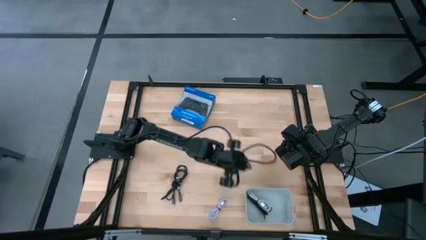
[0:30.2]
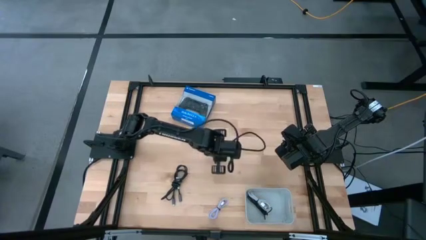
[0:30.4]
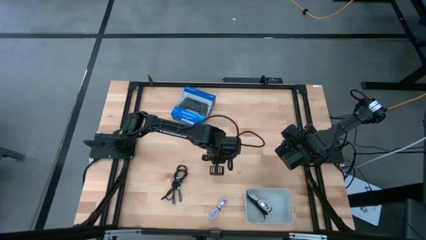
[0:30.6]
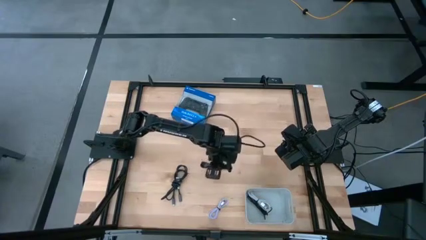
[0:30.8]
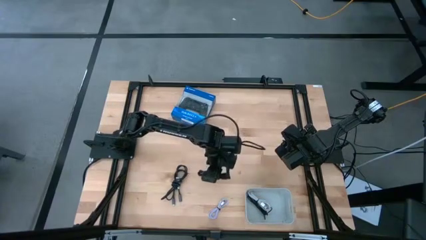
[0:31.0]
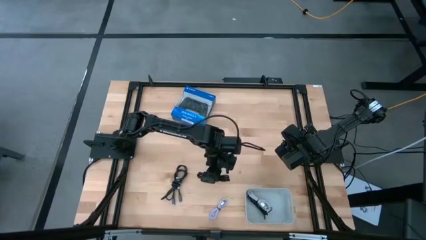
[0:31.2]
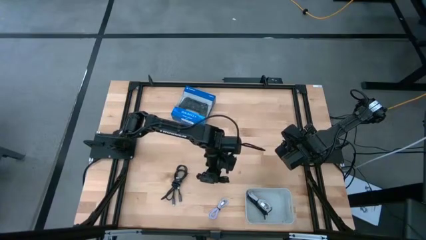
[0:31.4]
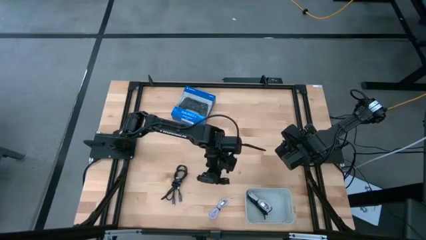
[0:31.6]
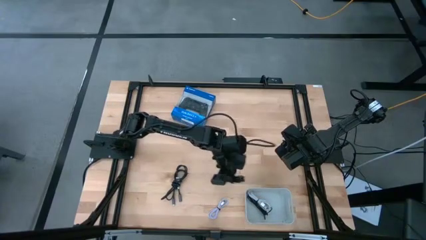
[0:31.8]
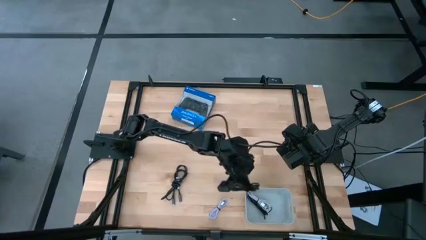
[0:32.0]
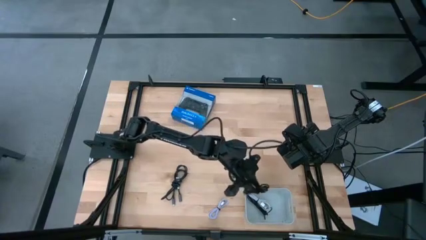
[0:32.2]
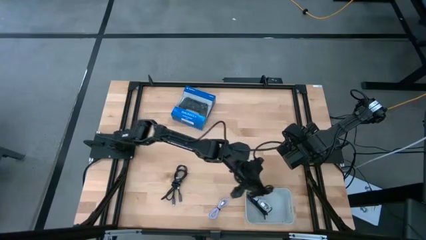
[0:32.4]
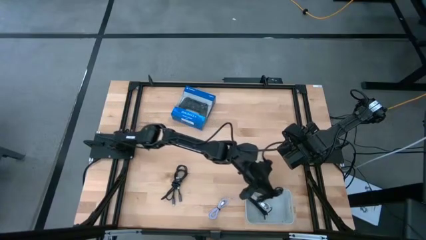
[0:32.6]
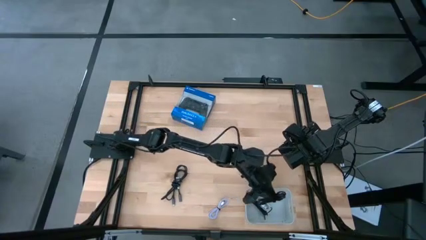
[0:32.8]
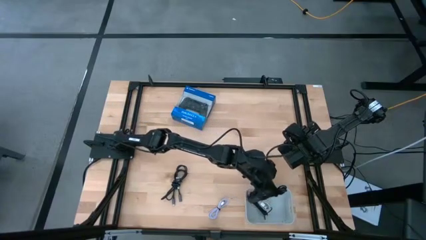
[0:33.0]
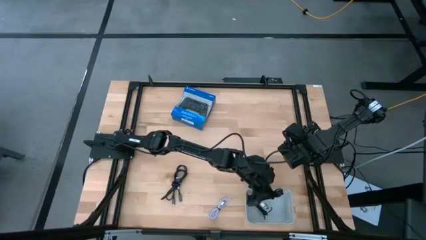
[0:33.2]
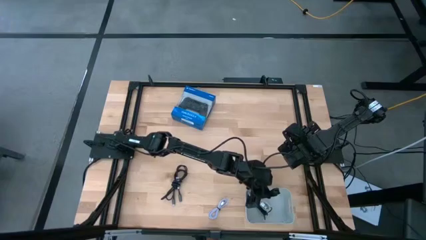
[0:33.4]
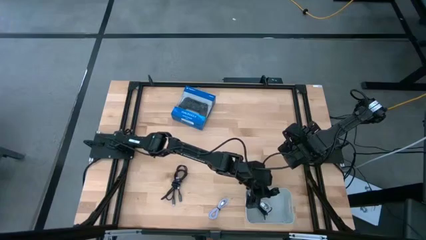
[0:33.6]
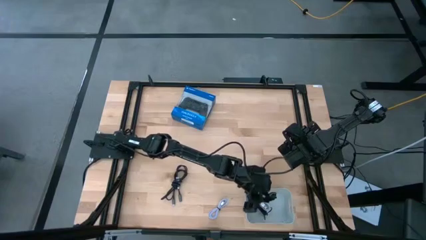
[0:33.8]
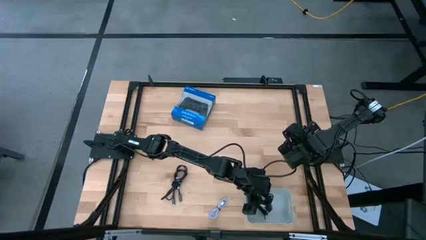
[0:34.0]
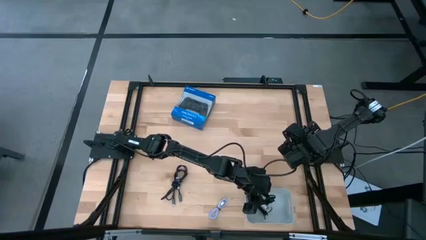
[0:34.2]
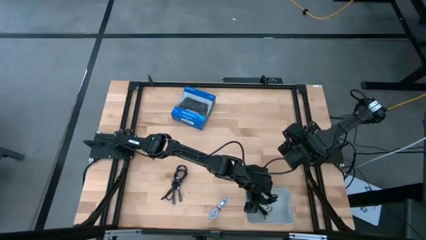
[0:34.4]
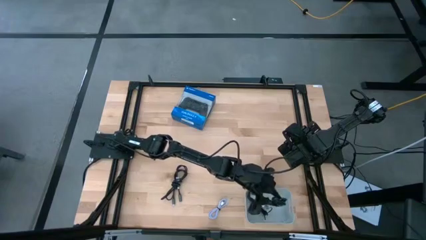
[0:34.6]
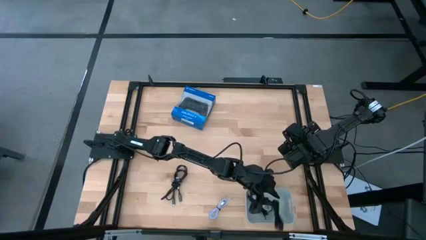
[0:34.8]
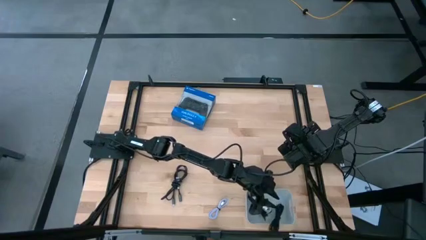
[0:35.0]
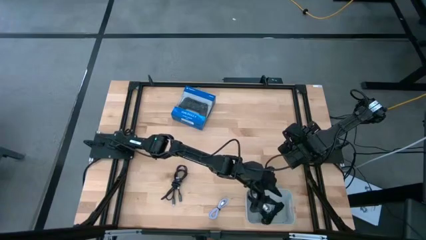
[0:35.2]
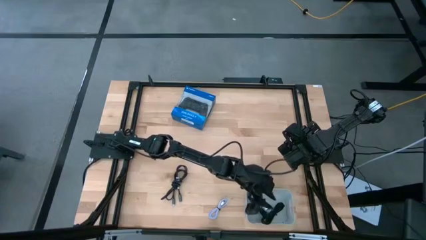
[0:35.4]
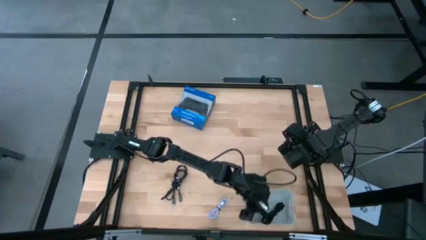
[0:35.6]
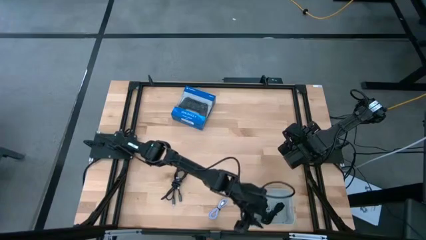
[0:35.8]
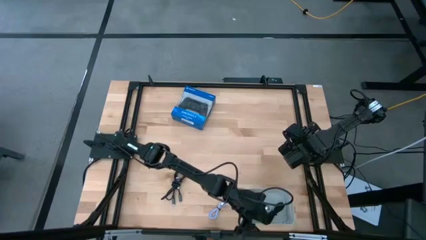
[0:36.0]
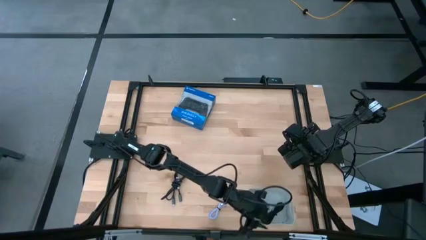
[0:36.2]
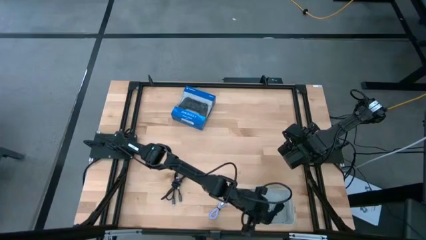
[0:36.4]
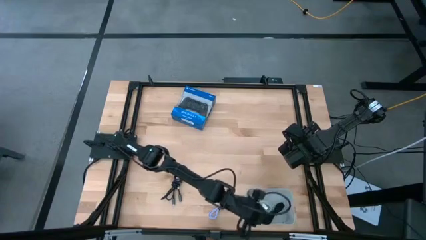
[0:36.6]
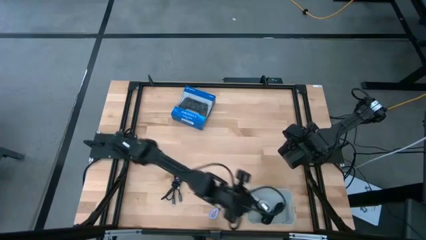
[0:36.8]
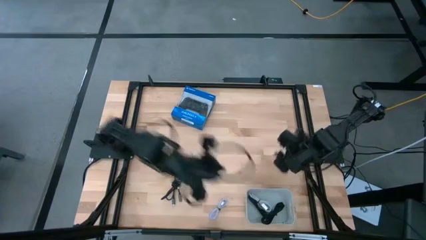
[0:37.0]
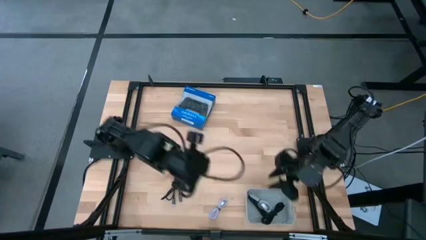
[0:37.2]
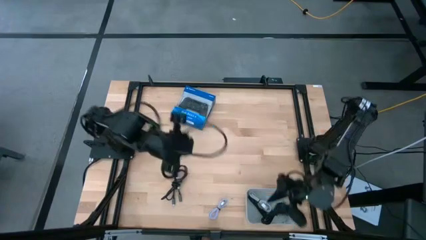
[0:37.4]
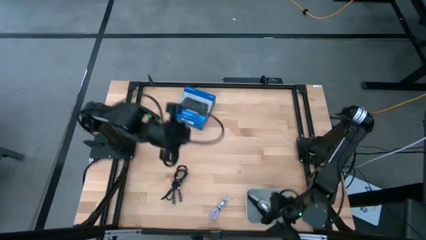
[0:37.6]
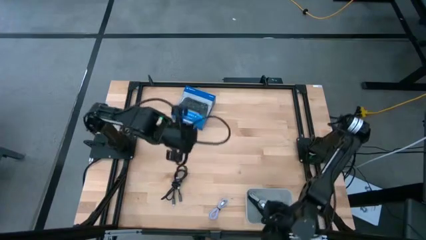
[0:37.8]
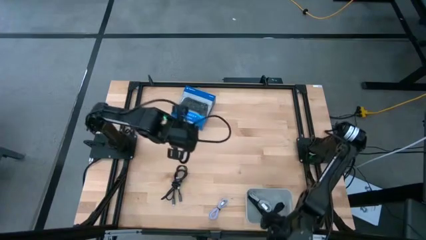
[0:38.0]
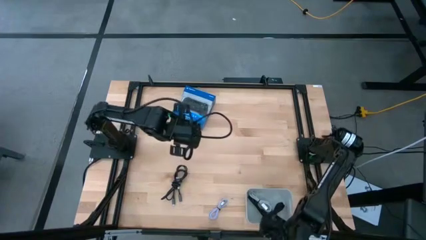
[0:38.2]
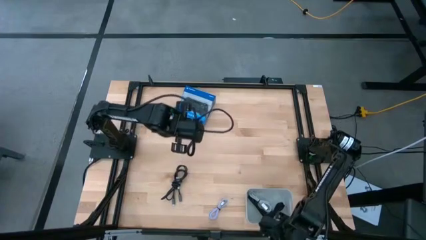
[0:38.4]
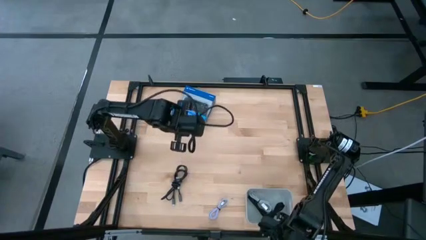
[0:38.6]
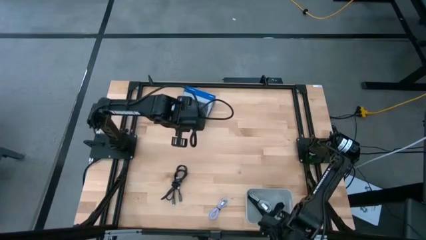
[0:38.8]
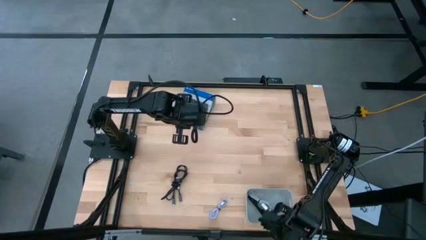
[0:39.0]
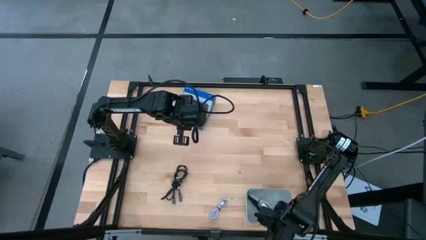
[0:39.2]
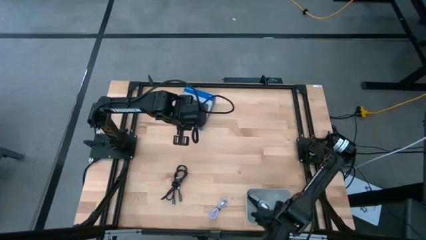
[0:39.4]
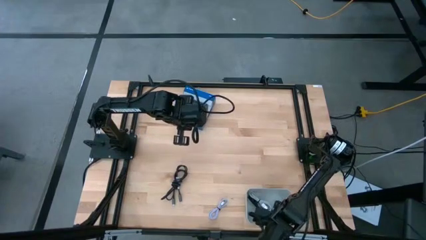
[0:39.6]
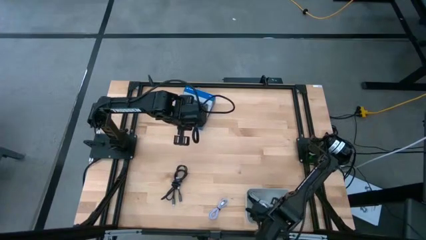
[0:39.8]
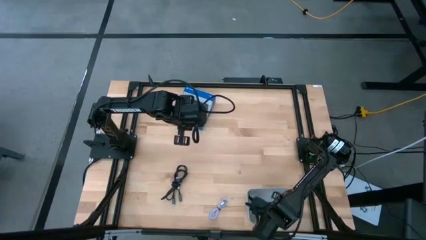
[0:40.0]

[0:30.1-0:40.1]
Task: Pick and place USB-C Cables
Put the top black charger cable into the white bin

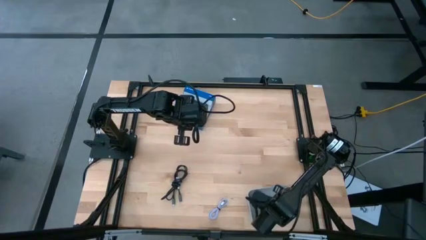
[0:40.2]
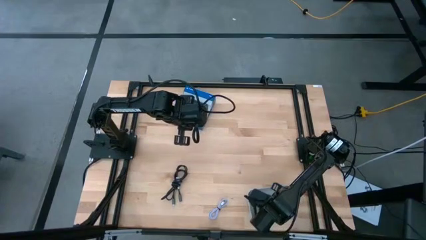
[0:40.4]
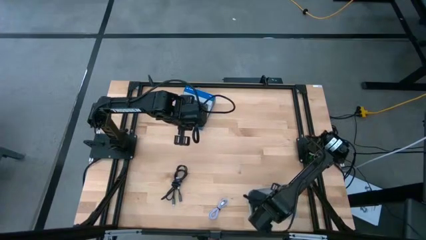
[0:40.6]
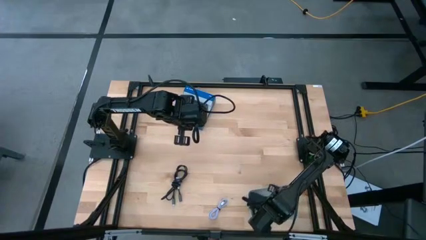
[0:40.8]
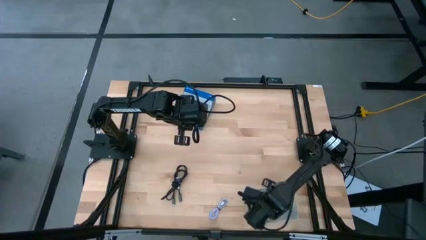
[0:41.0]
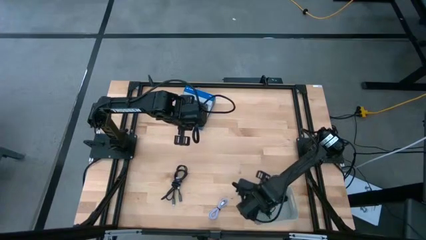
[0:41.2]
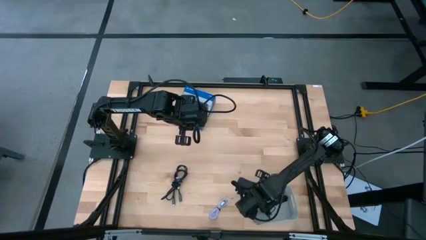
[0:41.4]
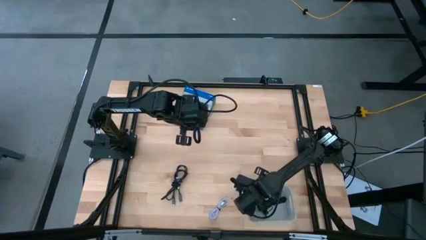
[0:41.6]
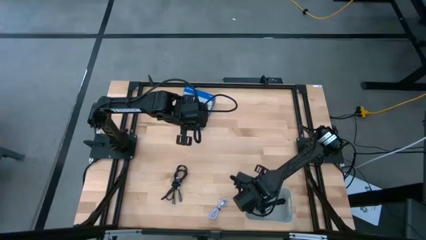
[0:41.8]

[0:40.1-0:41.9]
Adjust the white bin

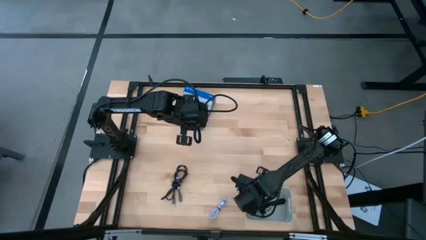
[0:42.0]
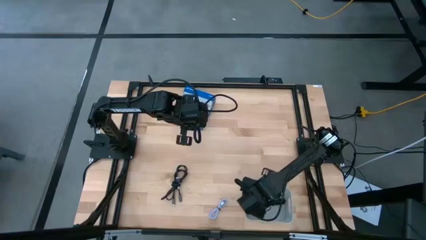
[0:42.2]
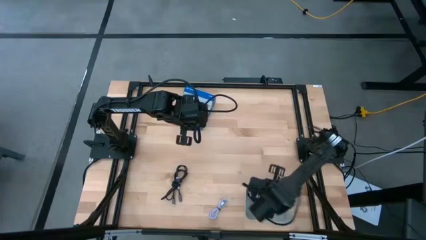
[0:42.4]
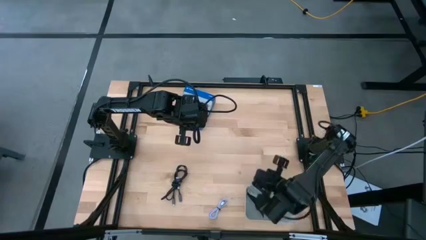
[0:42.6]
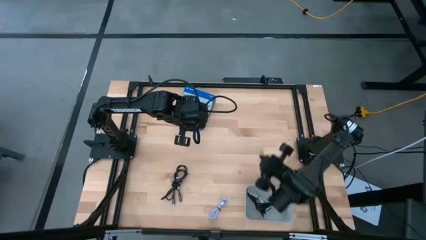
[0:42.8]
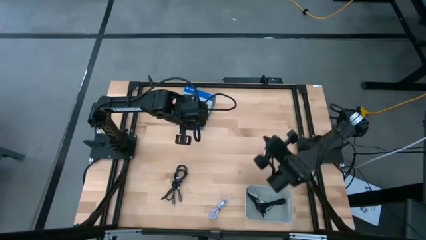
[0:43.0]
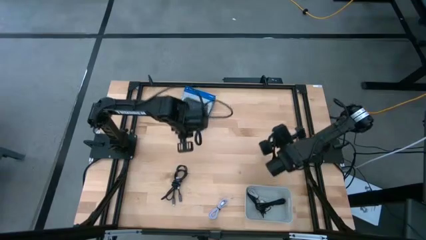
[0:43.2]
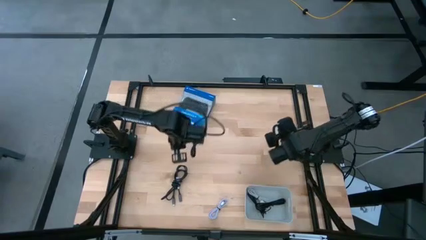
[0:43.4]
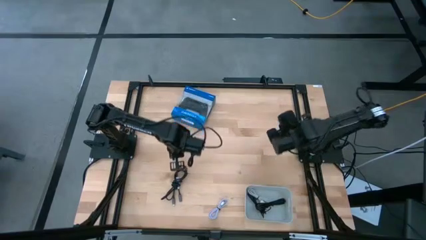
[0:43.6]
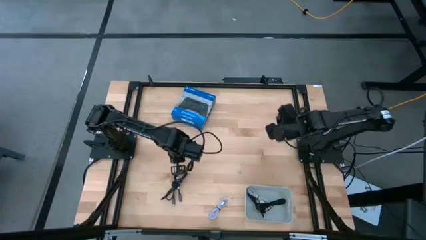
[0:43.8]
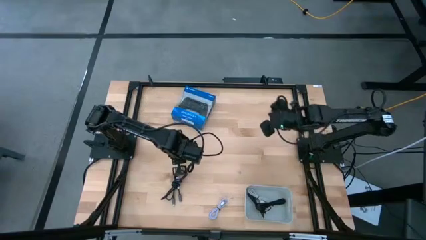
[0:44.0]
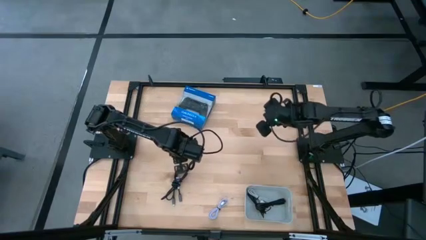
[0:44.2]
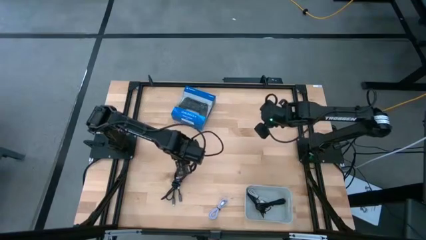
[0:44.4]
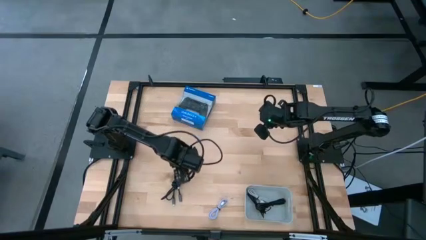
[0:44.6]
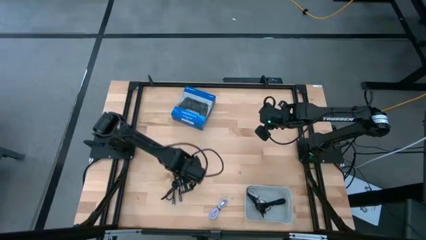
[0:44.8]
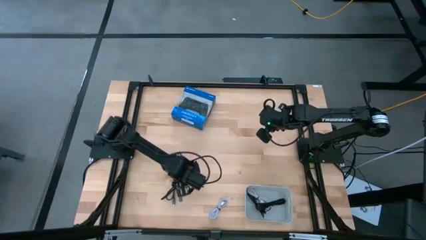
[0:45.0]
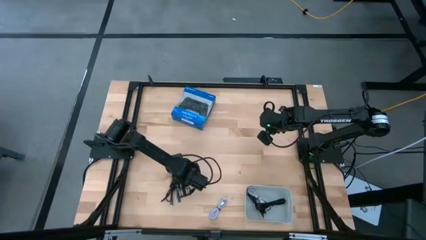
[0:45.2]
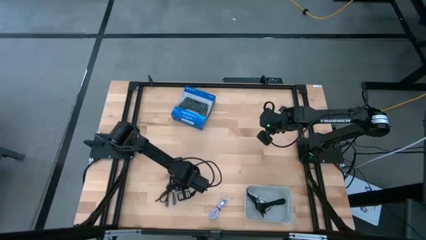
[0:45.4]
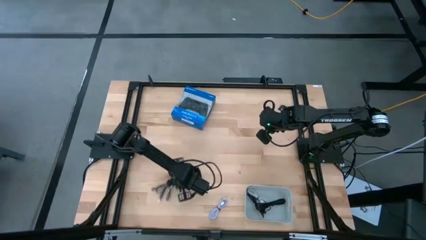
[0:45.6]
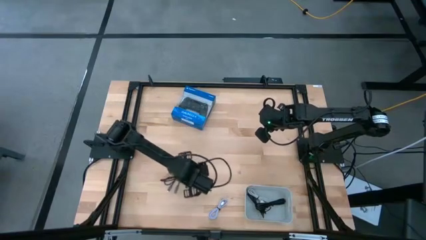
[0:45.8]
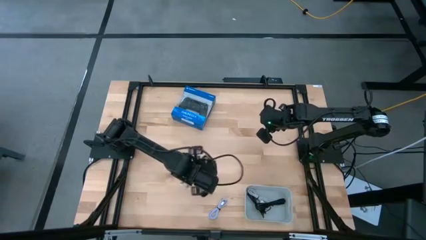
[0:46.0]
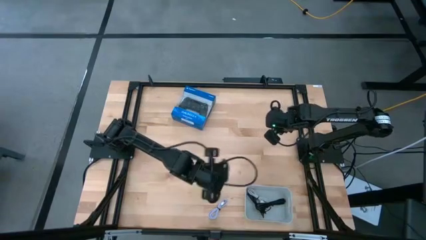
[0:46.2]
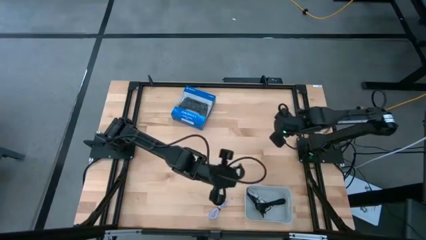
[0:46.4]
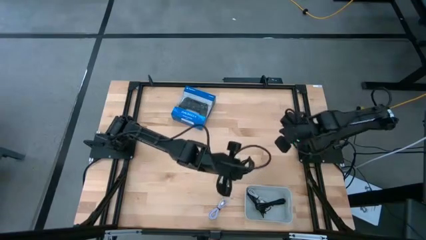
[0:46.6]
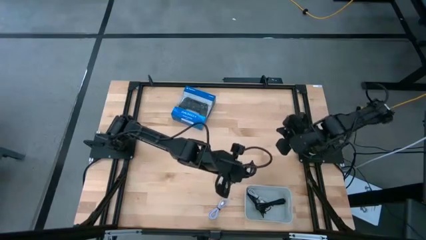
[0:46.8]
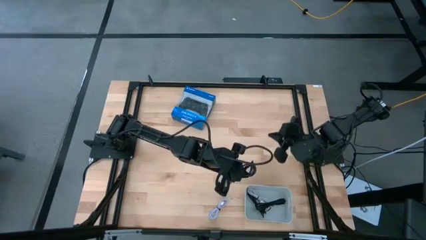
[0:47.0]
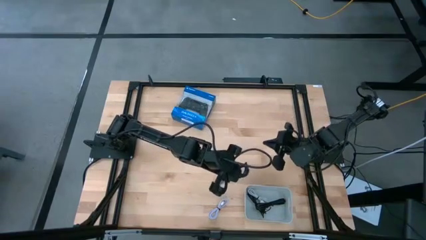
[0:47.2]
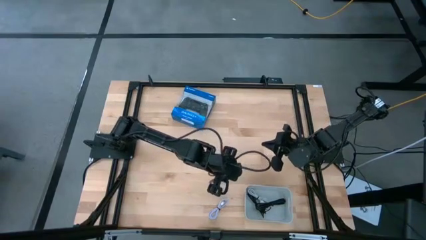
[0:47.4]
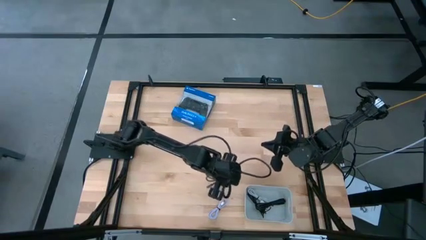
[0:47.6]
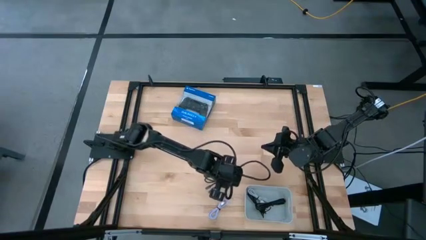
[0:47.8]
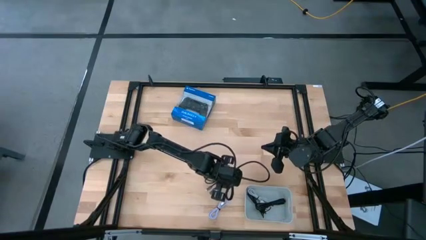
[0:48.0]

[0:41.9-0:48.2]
Move the black charger cable to the center of the table
